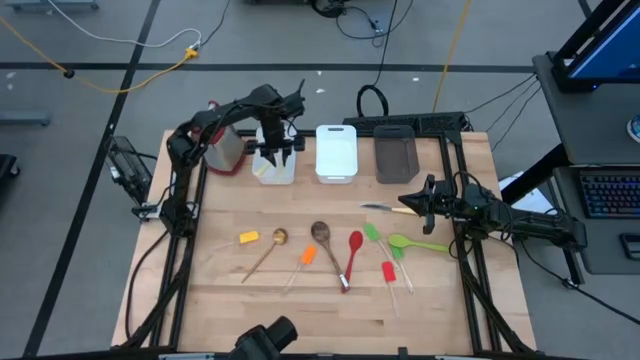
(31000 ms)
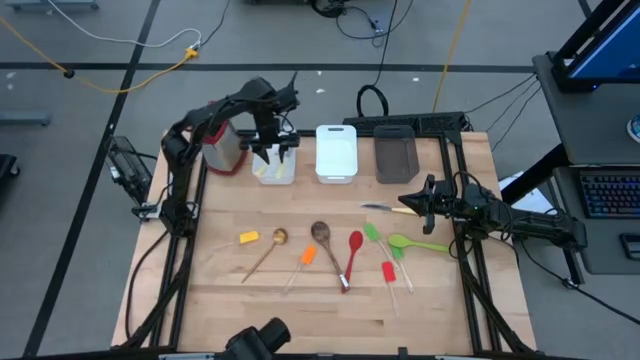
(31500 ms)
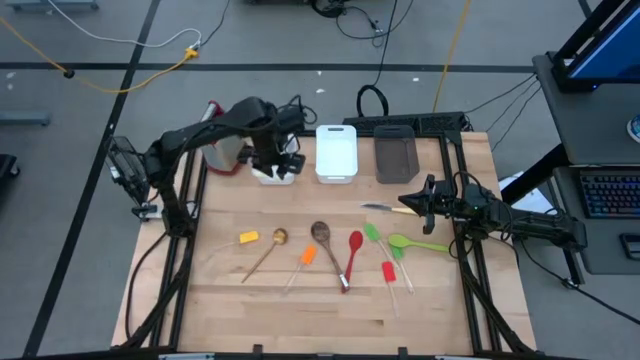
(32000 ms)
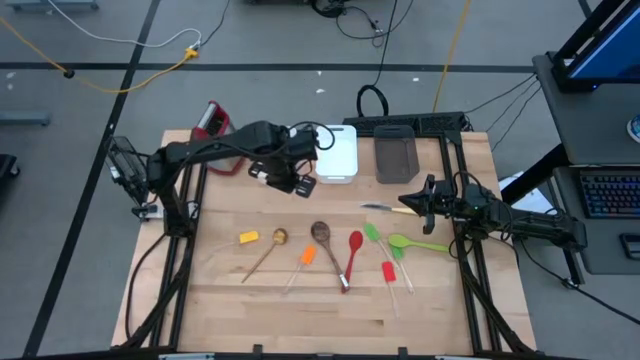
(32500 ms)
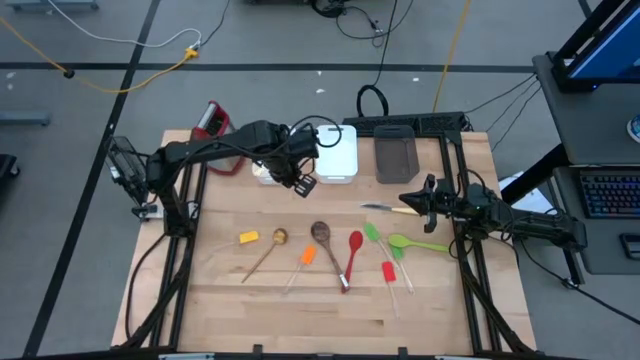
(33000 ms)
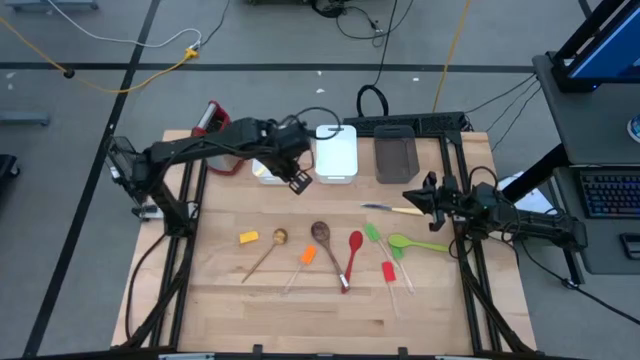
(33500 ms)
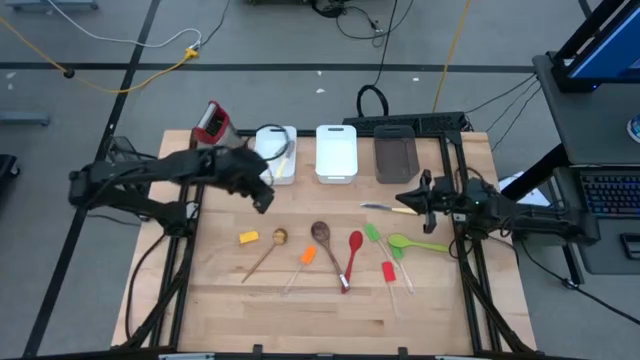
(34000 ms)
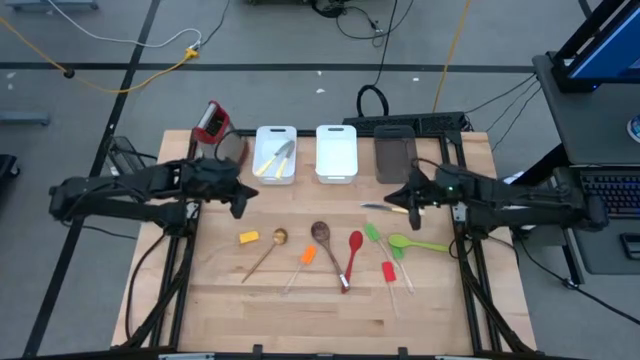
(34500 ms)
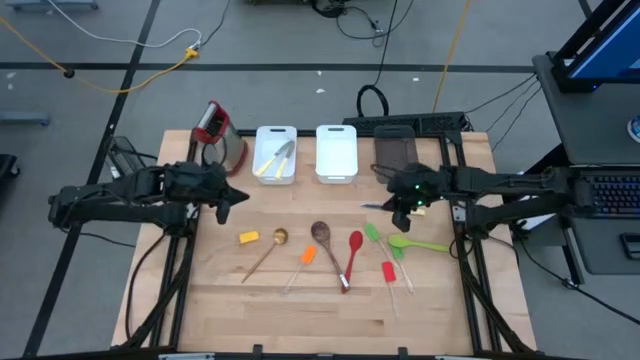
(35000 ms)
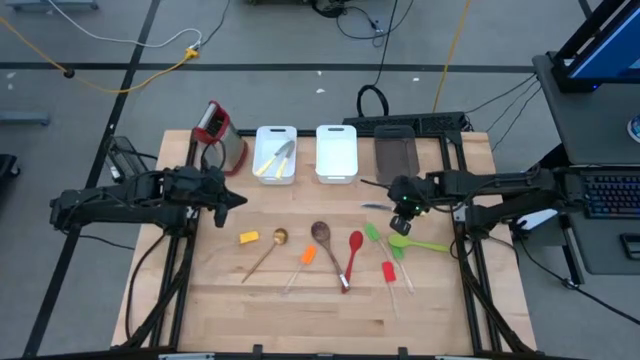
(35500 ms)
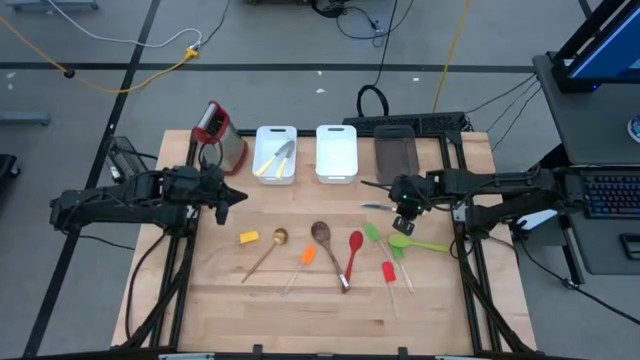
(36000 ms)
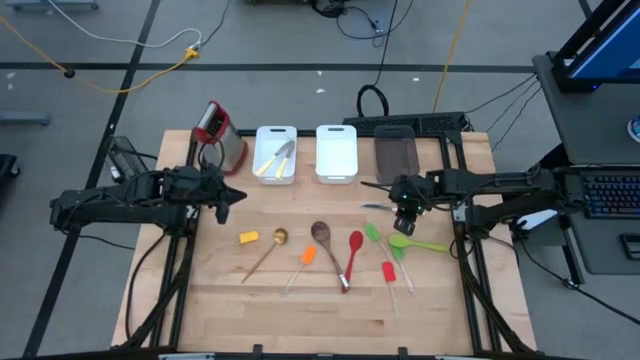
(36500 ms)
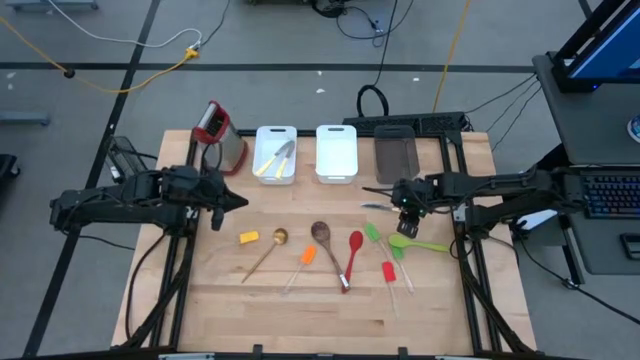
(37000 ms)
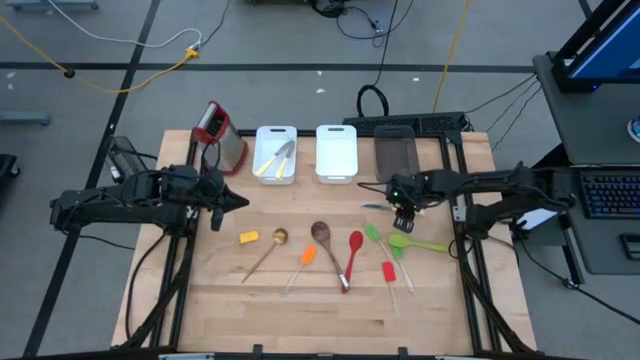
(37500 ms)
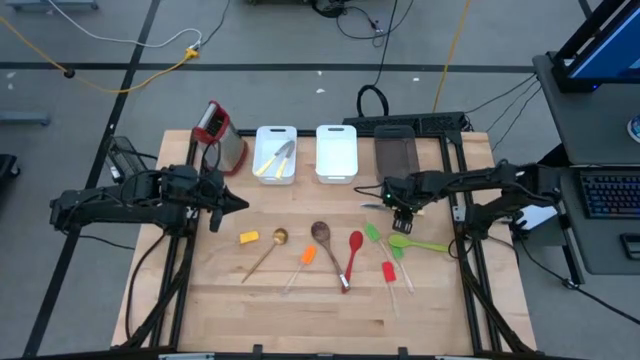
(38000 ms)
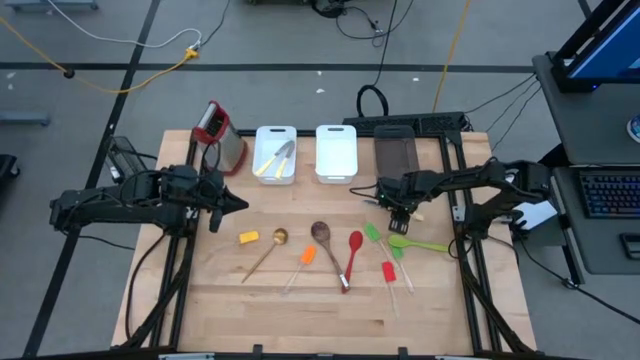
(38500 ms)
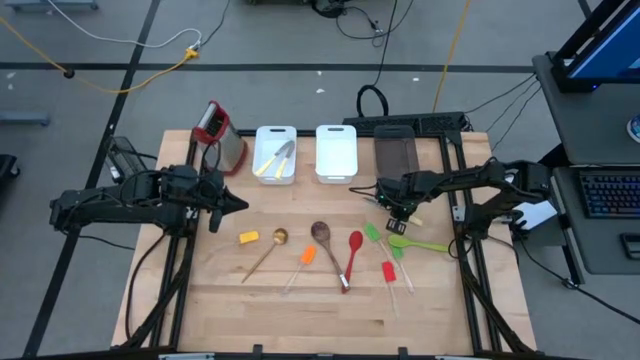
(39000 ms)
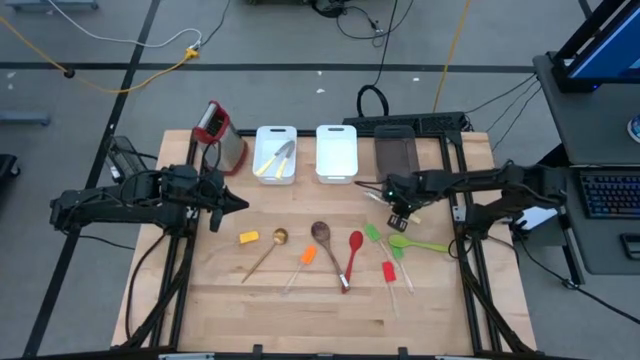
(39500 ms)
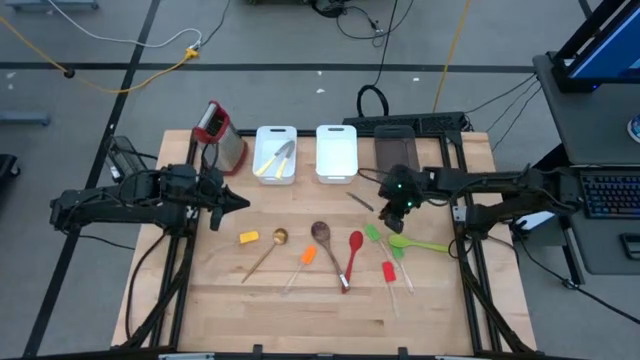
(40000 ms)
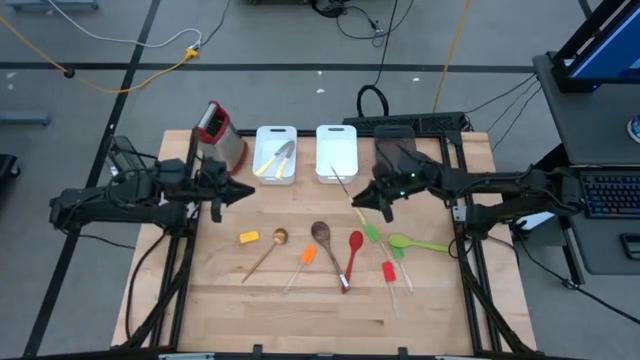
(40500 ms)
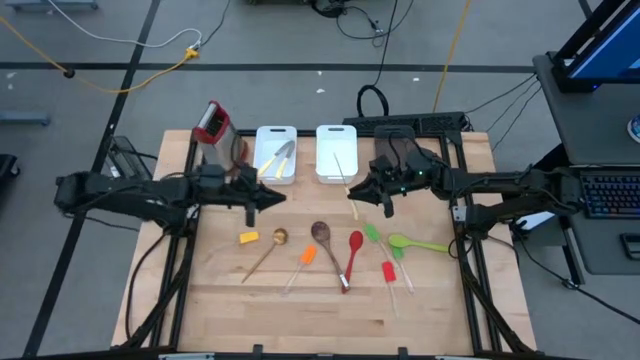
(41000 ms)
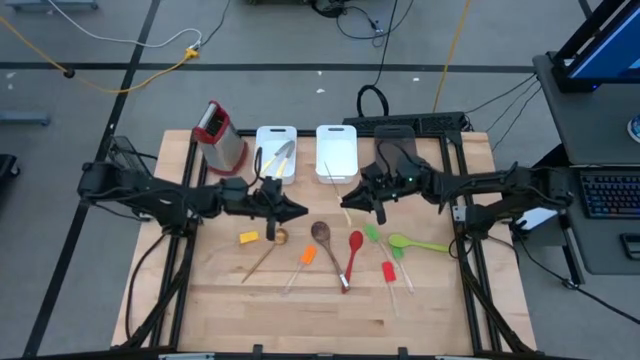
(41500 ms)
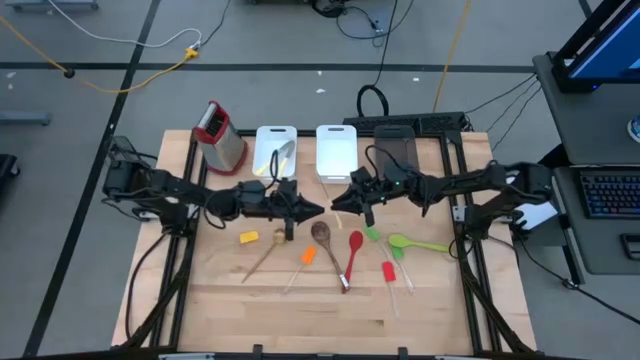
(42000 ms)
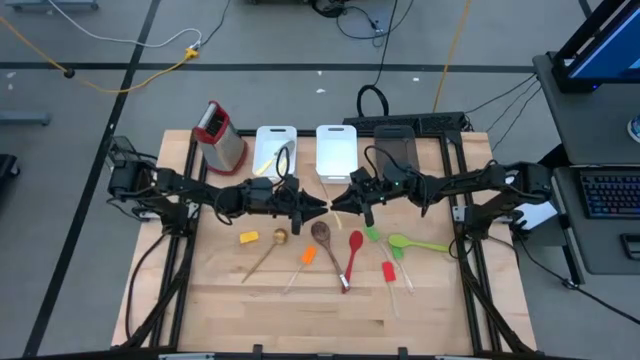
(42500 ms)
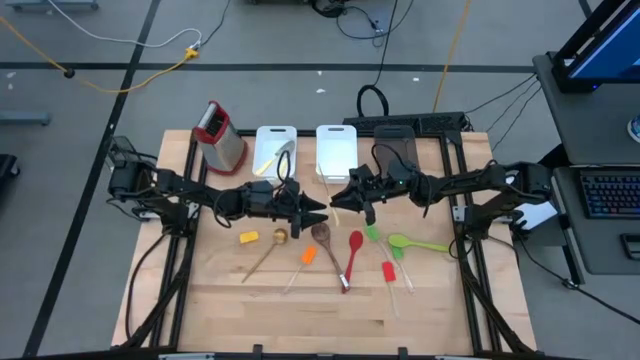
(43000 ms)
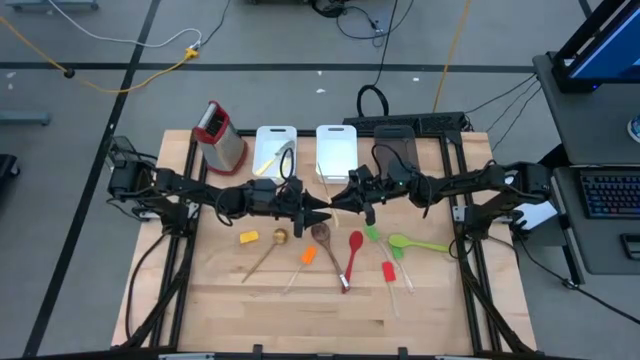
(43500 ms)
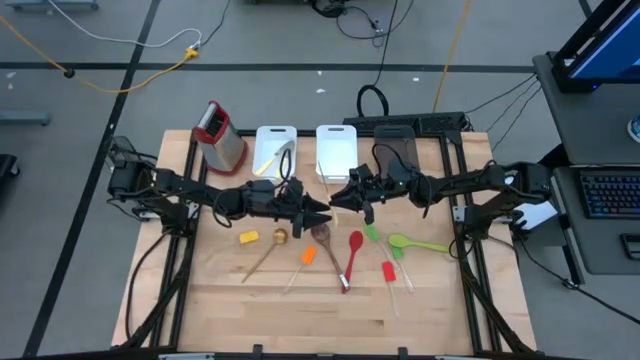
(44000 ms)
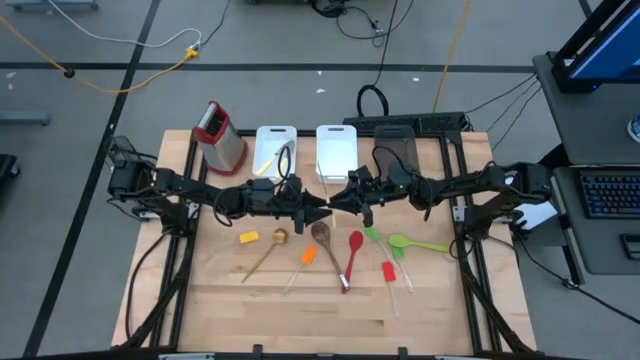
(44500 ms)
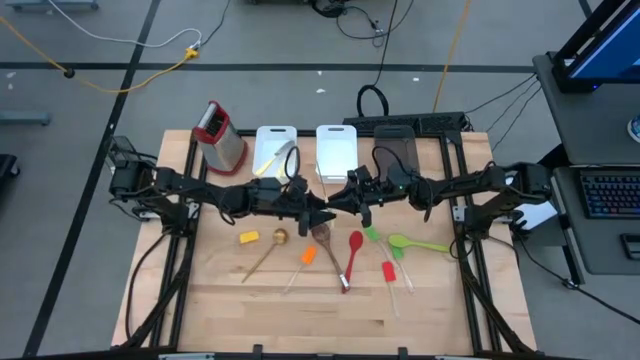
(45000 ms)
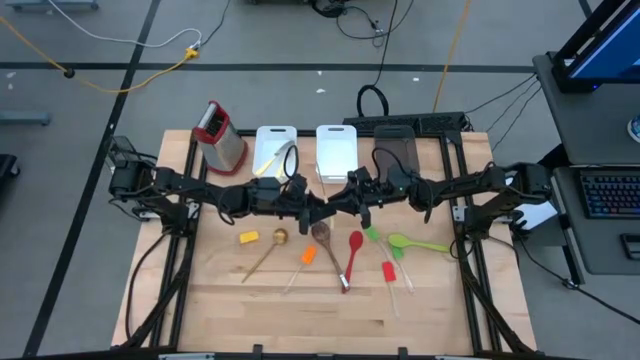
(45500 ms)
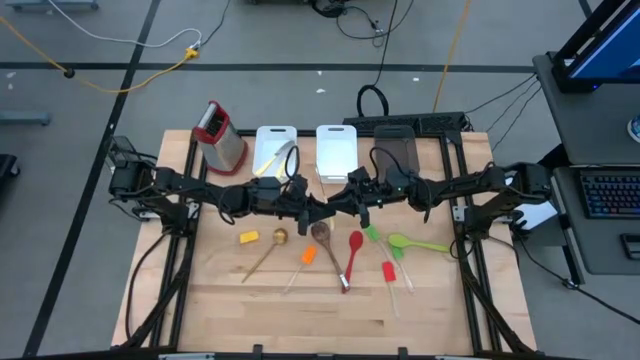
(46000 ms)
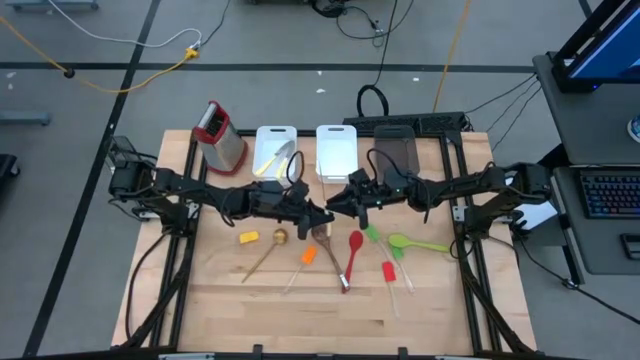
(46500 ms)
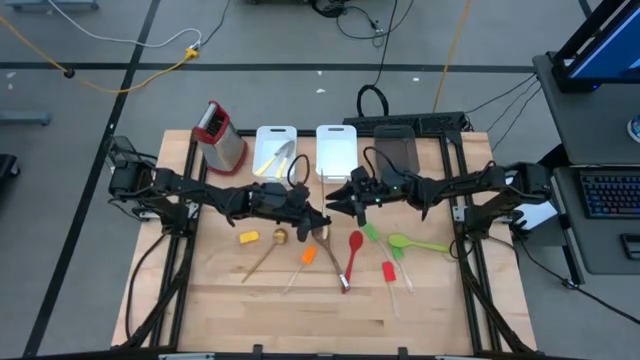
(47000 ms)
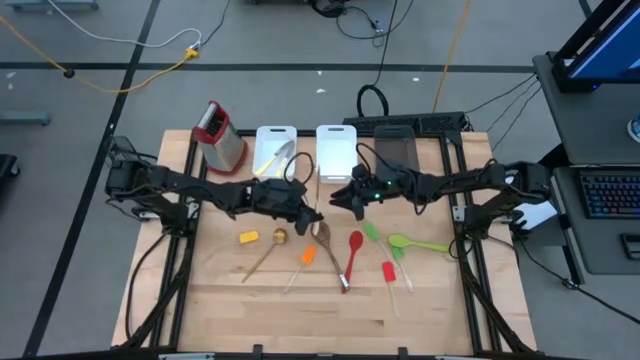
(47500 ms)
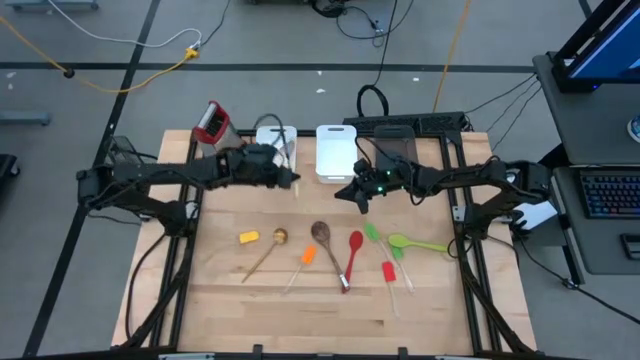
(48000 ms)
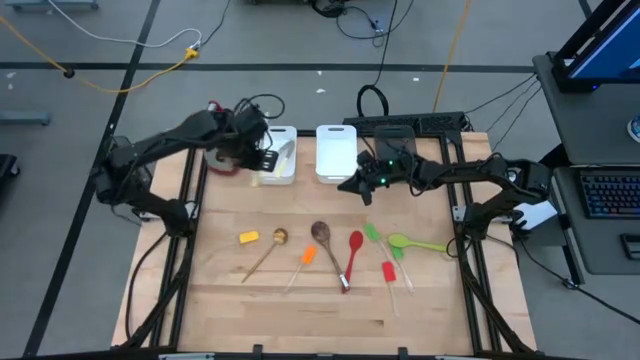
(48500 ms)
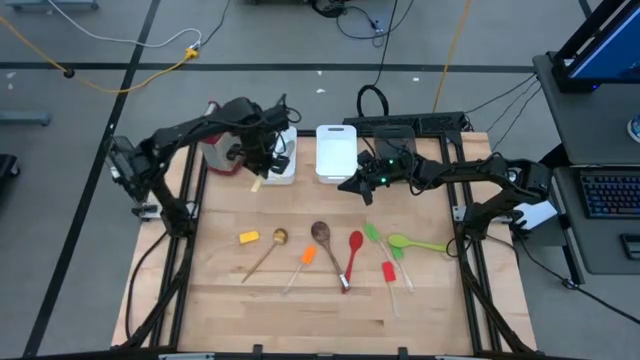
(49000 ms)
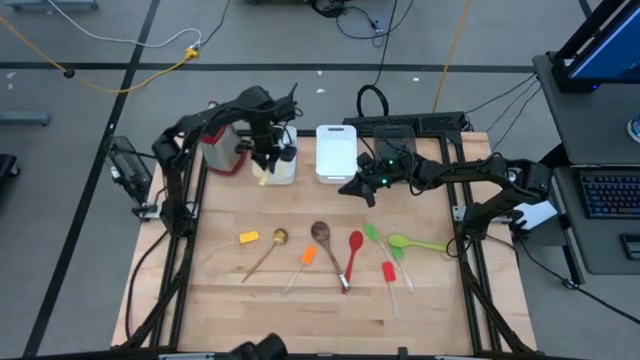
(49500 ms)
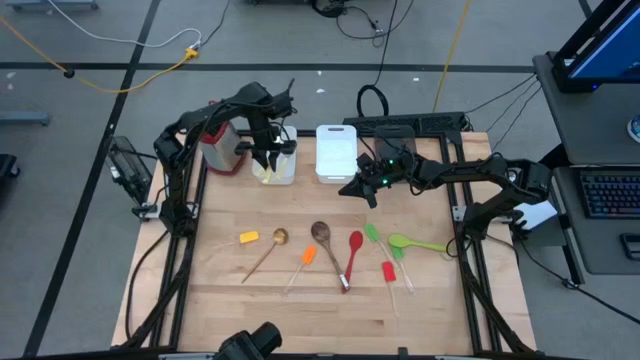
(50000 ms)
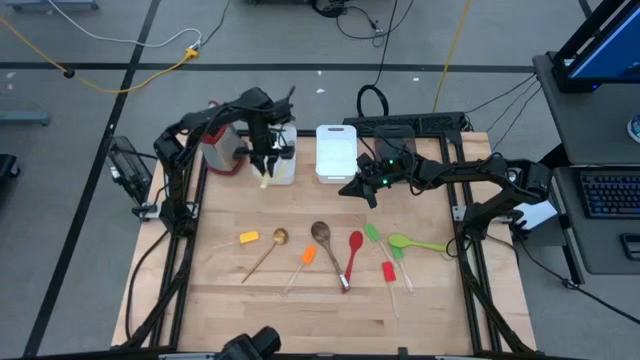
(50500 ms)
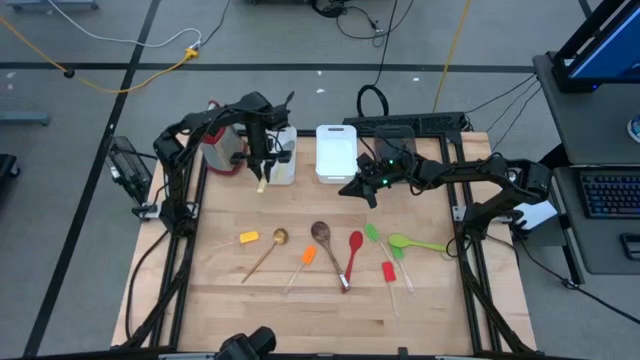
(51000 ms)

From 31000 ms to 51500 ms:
Task: Pick & Place Kitchen Items
Put the yellow knife into the left white bin
